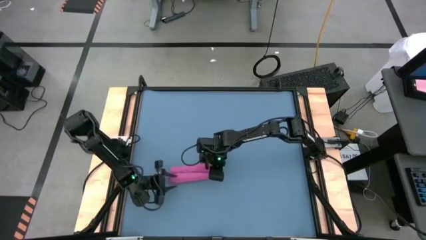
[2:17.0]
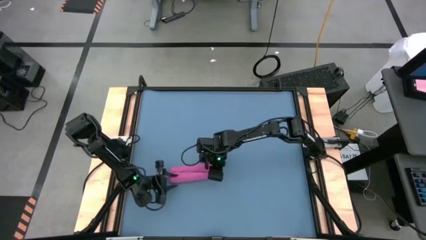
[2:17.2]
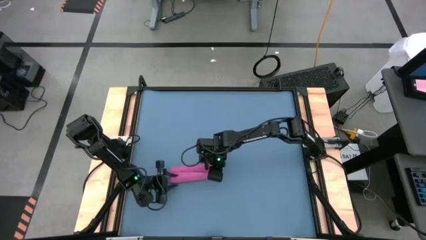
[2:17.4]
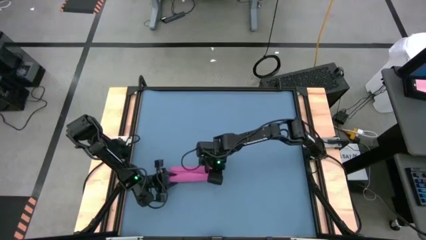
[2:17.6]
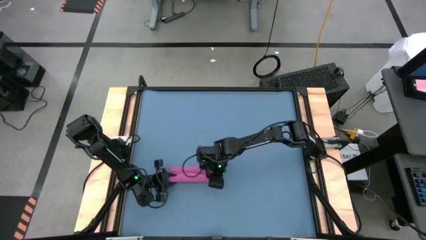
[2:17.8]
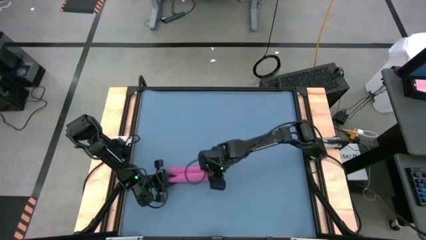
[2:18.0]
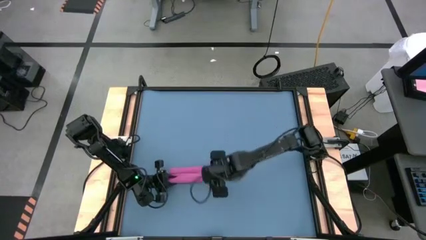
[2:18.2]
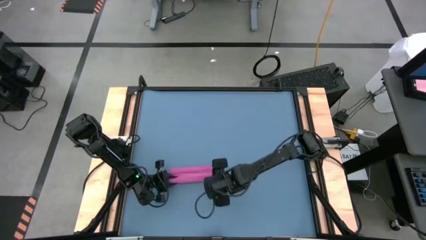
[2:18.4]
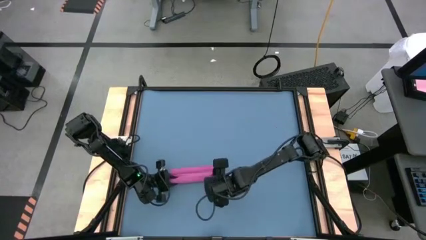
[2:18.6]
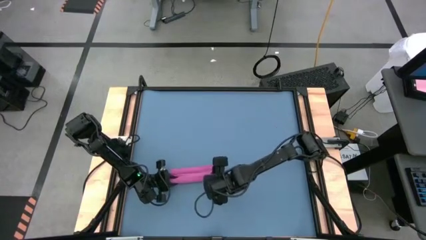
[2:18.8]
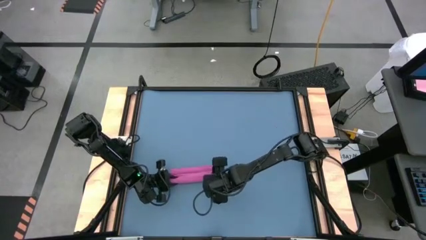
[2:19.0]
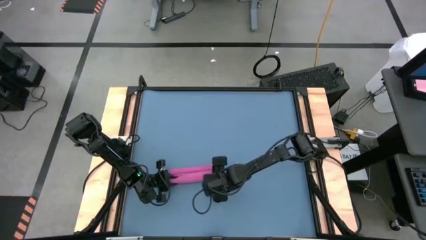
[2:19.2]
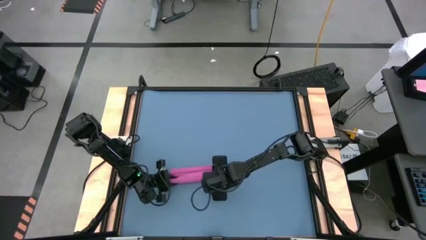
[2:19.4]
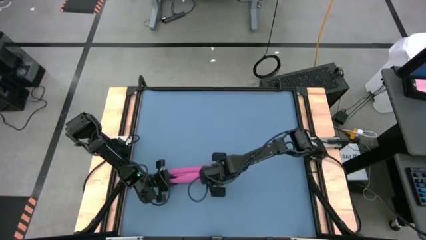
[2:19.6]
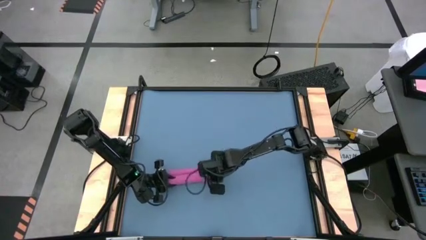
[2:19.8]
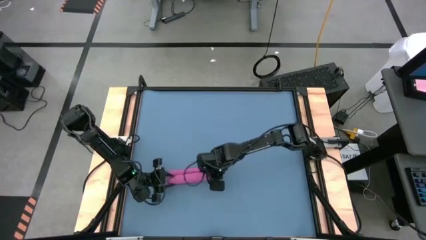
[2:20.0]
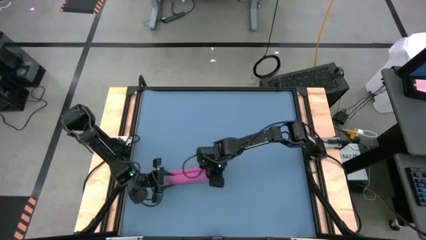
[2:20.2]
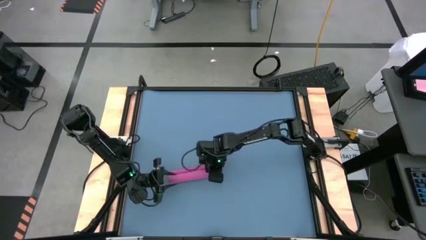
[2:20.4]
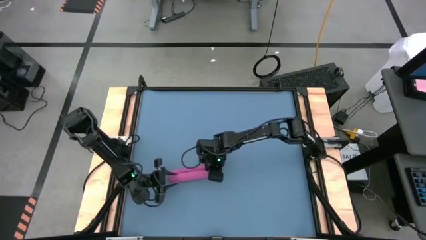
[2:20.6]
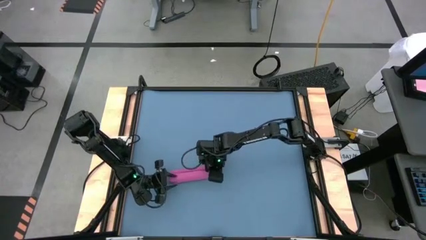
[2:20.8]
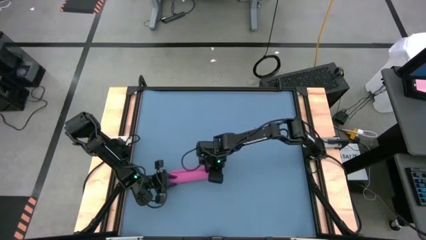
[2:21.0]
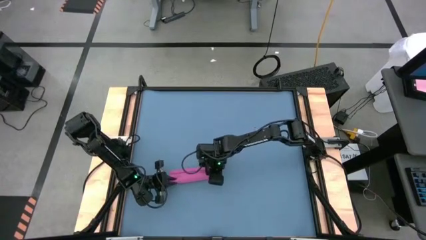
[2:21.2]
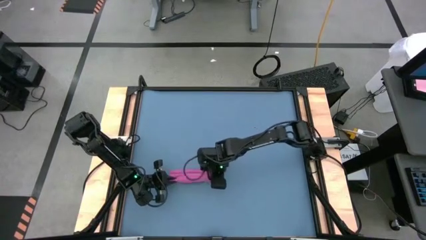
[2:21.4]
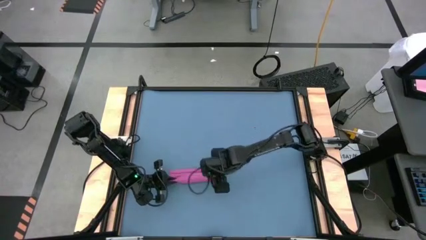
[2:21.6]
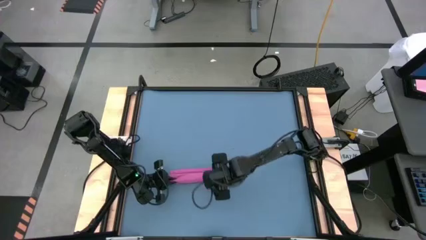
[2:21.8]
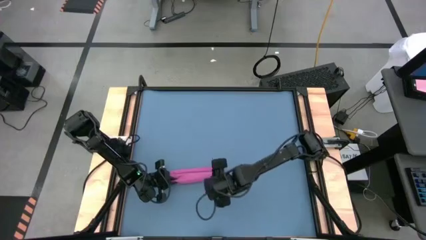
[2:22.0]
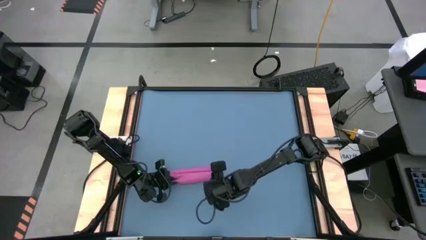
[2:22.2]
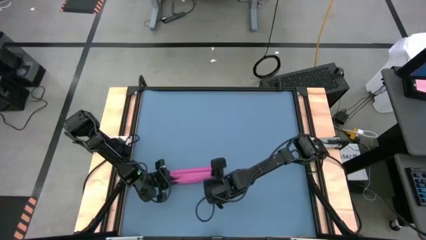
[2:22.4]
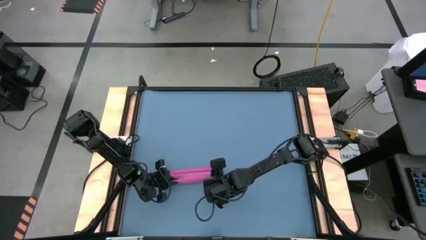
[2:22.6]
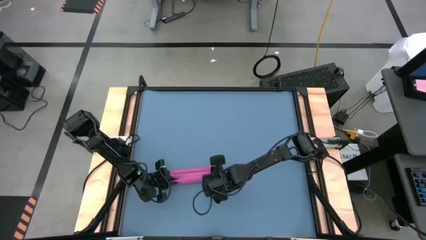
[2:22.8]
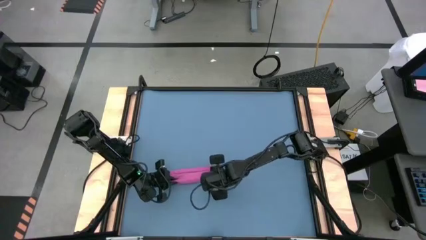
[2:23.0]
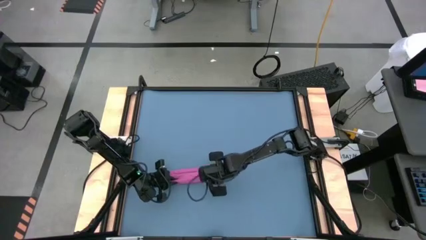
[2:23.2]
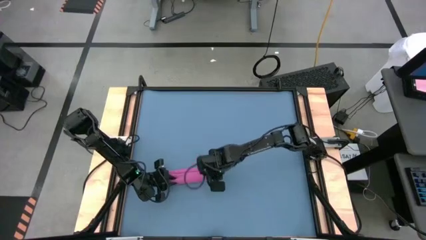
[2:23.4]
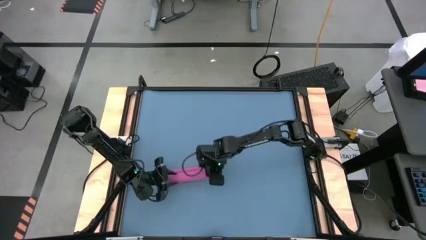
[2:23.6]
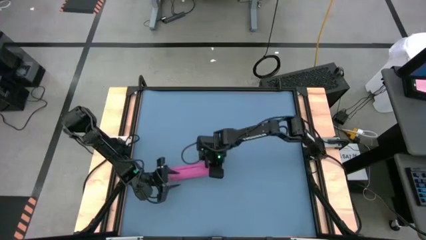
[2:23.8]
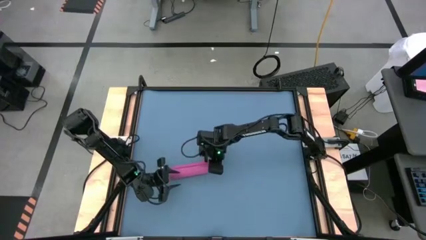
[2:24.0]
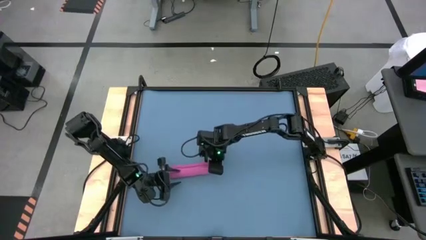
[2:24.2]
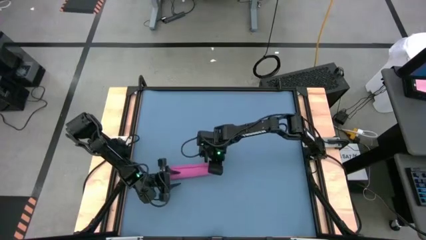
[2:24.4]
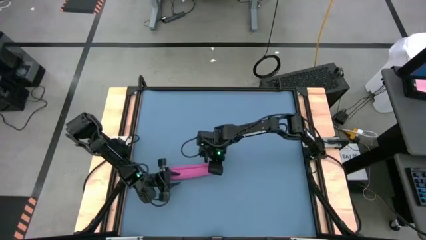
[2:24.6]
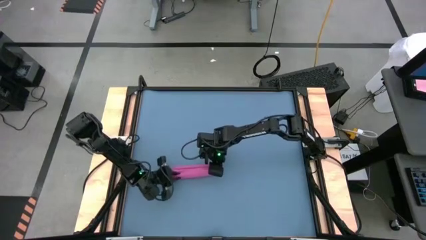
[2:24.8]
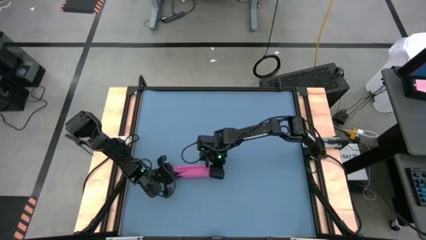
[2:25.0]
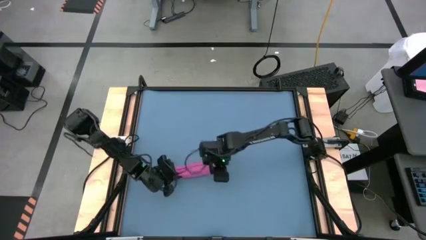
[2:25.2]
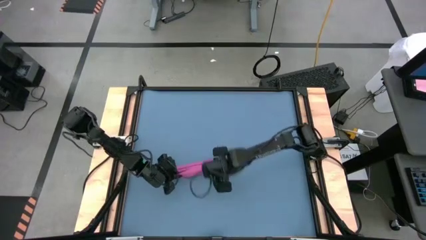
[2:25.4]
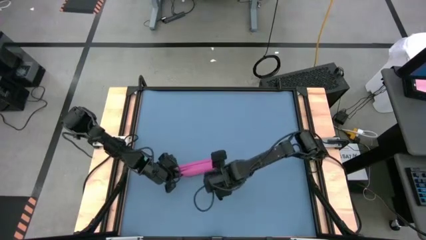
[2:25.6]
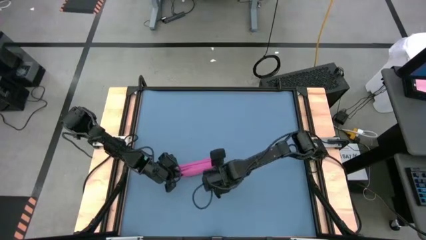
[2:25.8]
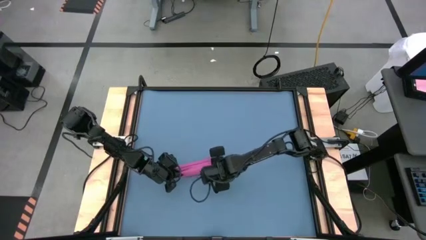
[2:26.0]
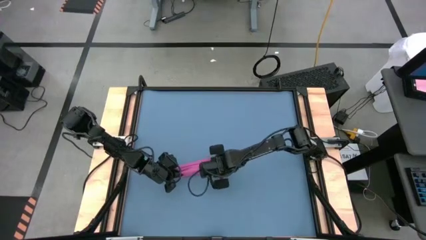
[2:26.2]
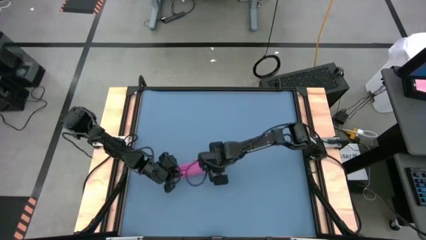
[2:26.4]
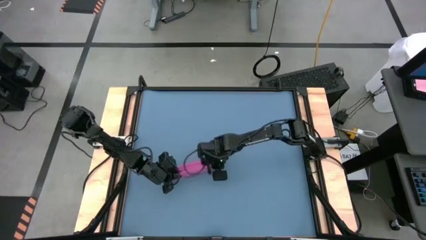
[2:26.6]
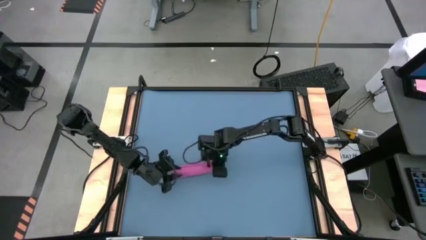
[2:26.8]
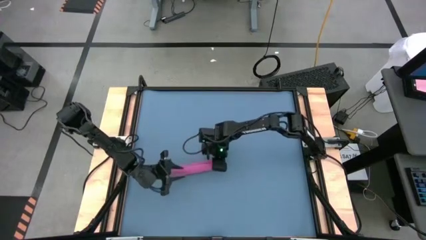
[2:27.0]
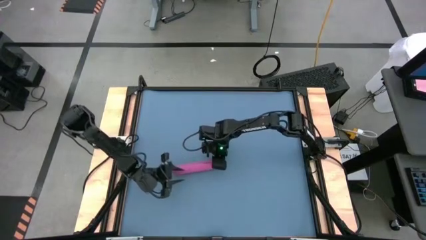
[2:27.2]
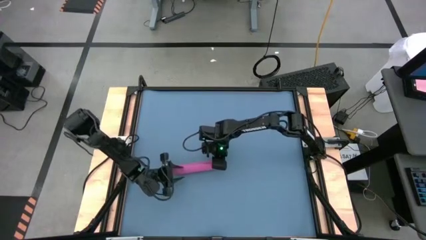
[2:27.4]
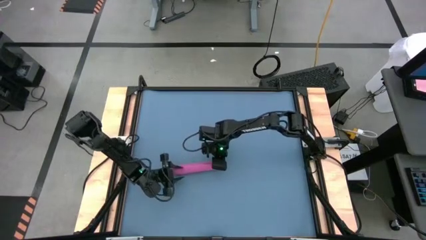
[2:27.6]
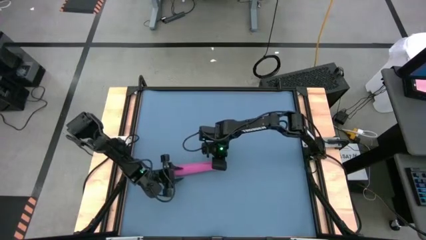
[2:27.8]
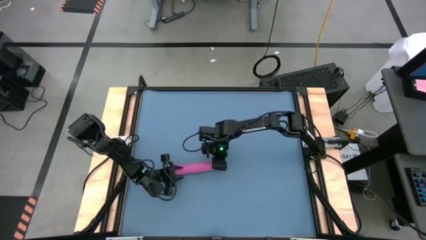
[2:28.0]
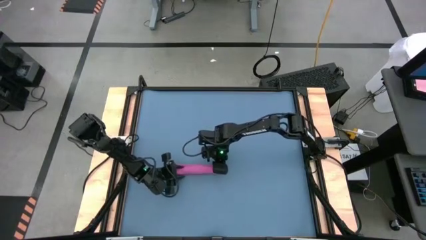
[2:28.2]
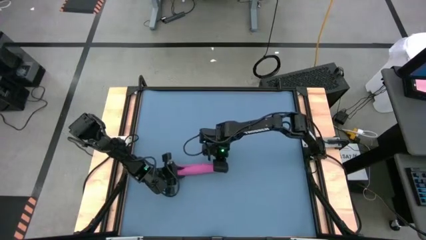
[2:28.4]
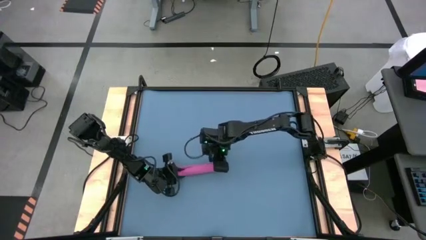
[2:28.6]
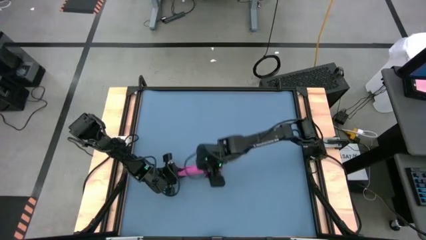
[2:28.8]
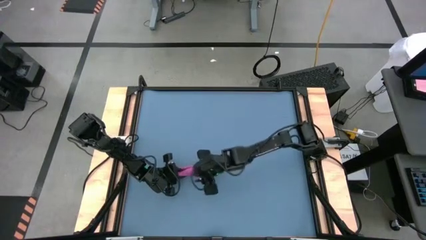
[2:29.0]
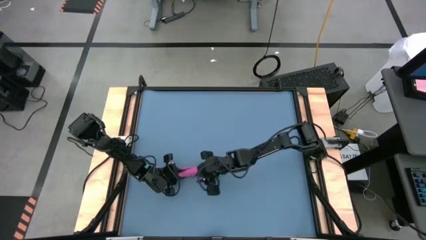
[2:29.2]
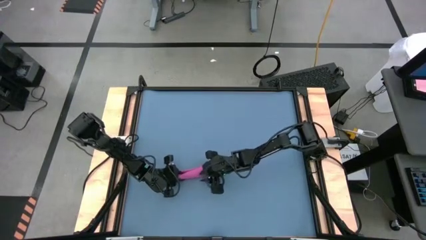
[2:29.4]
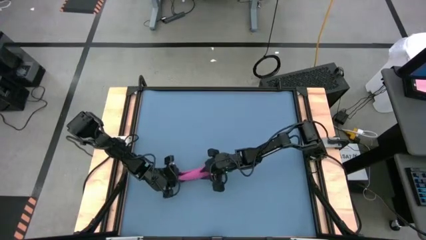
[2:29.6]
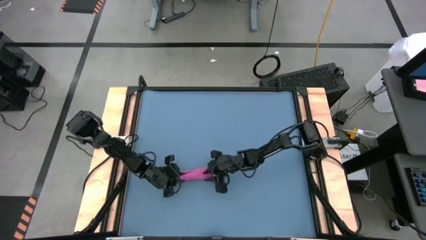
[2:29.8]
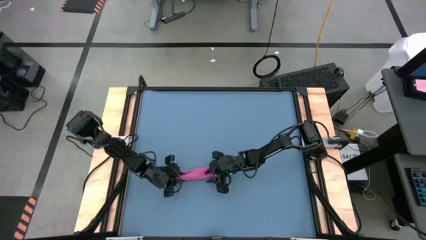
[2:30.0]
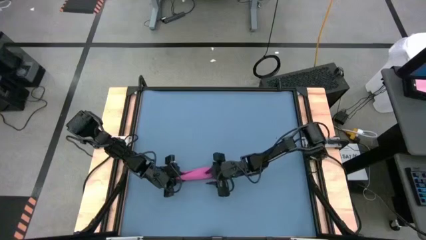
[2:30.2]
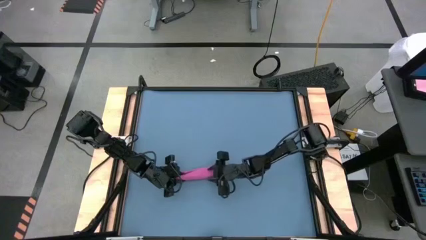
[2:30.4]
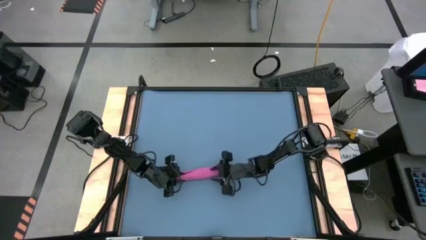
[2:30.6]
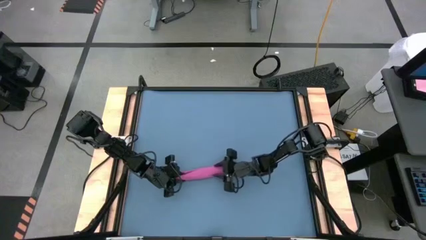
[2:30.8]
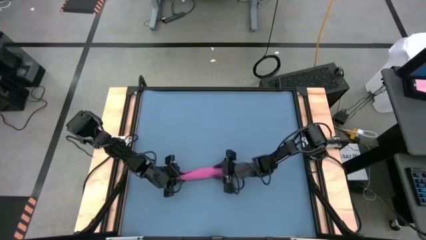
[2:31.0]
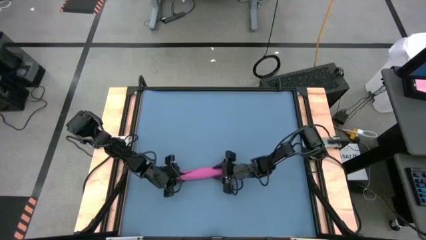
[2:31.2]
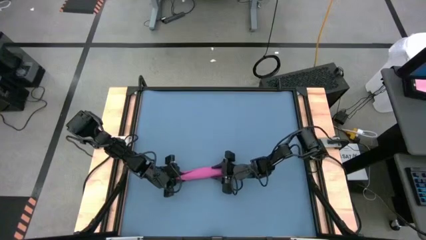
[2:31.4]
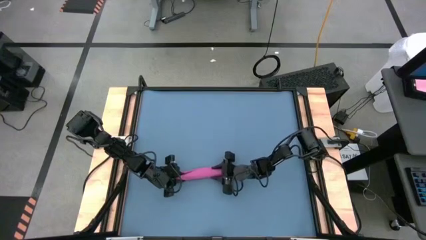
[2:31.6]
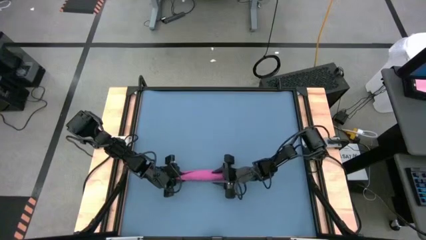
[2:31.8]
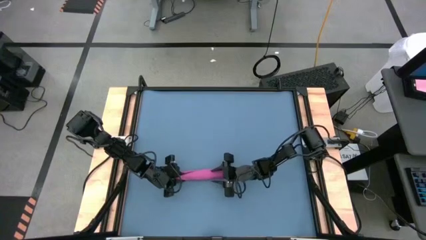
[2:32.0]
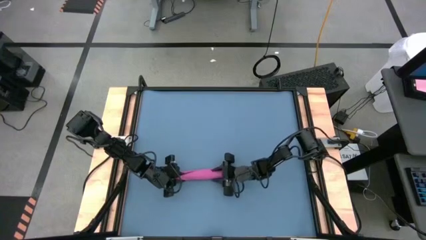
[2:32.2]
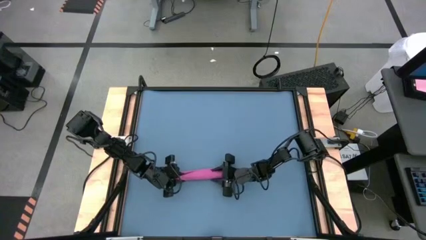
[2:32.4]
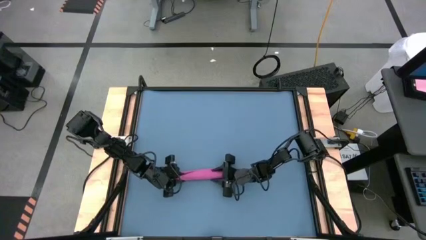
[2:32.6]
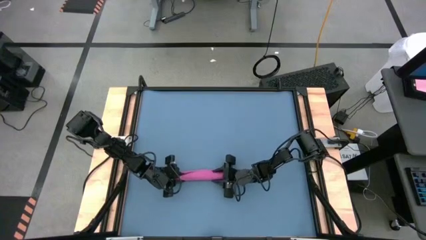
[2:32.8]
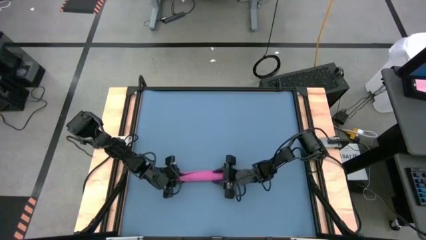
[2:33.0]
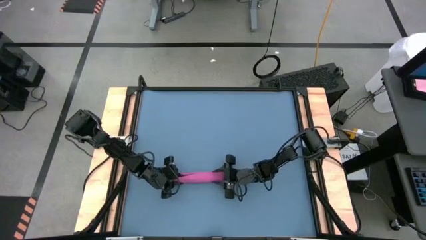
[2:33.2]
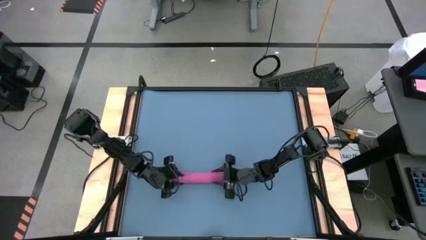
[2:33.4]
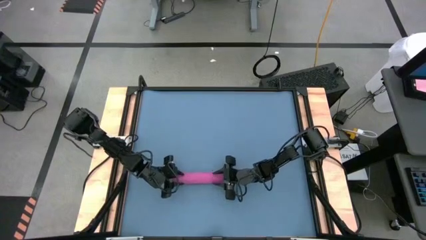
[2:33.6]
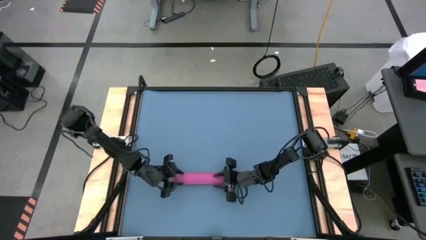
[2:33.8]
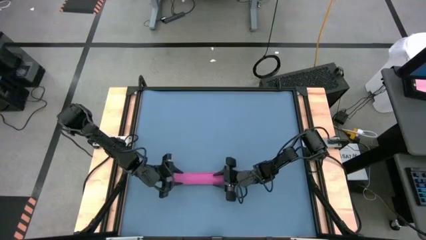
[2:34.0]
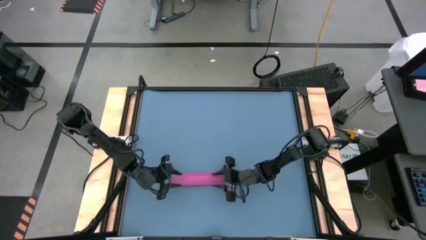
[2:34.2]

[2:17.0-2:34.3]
Task: Roll towel
Roll the light red towel
